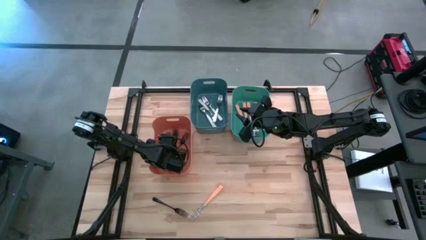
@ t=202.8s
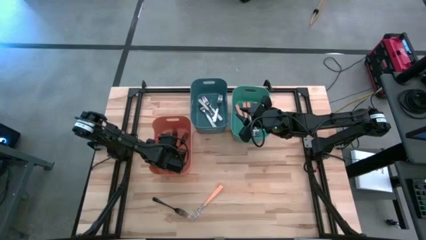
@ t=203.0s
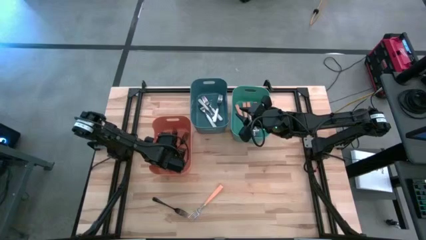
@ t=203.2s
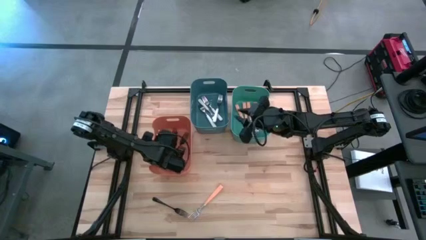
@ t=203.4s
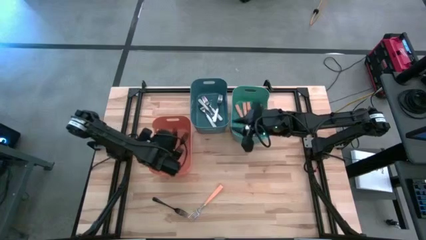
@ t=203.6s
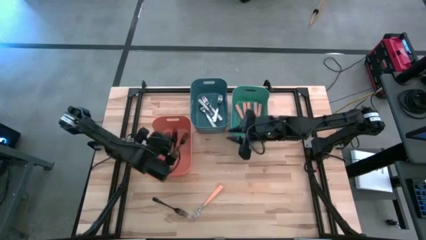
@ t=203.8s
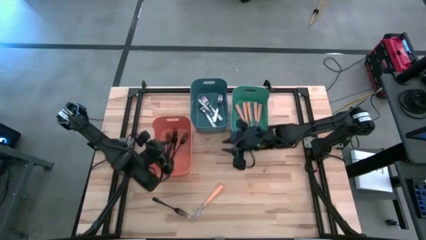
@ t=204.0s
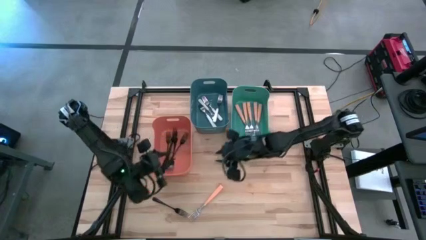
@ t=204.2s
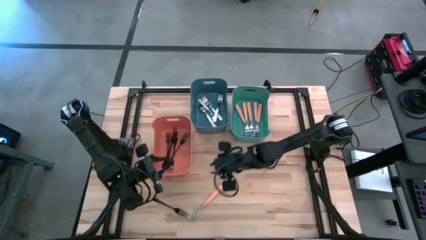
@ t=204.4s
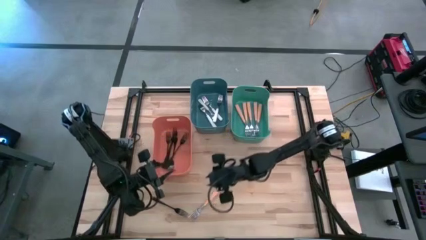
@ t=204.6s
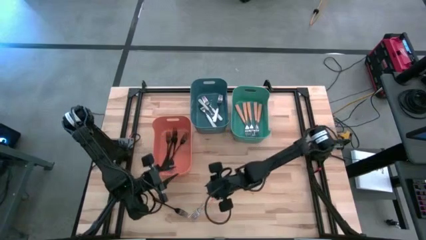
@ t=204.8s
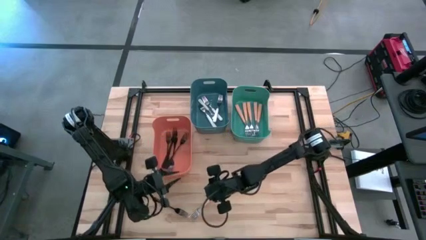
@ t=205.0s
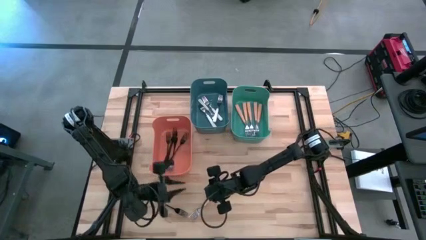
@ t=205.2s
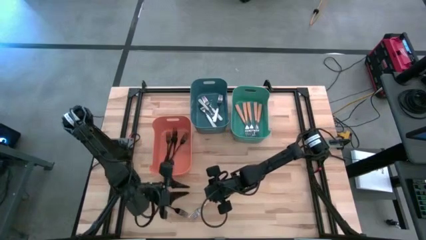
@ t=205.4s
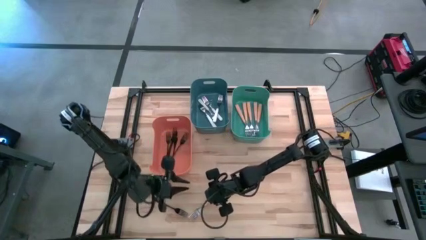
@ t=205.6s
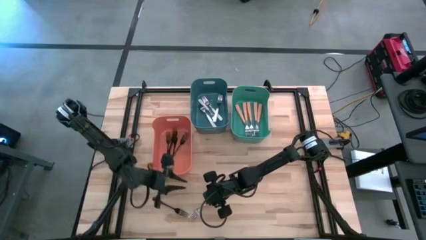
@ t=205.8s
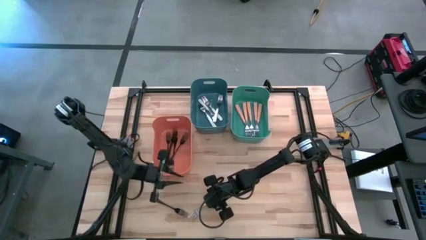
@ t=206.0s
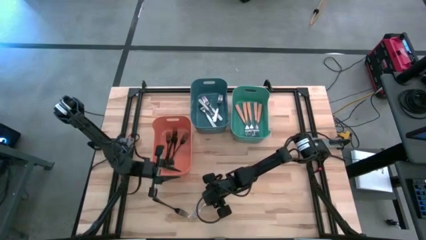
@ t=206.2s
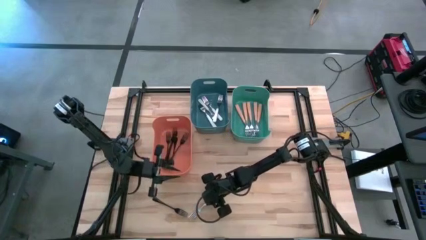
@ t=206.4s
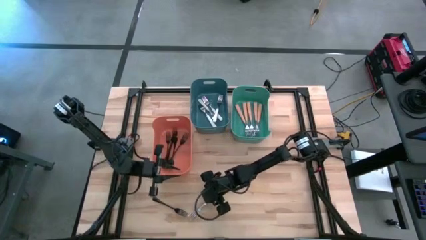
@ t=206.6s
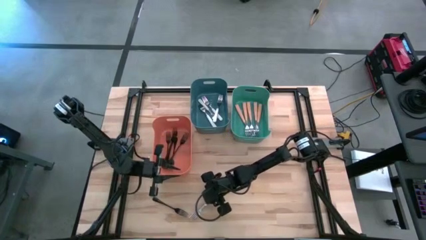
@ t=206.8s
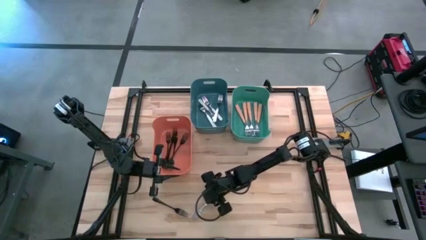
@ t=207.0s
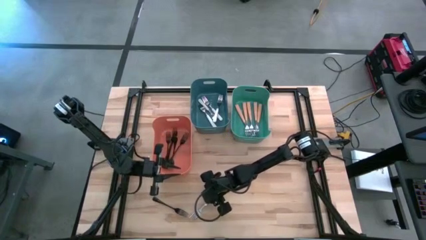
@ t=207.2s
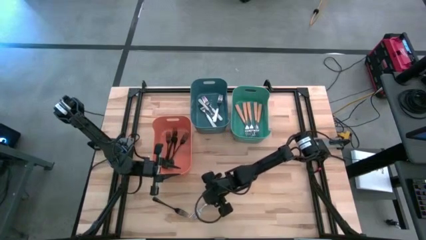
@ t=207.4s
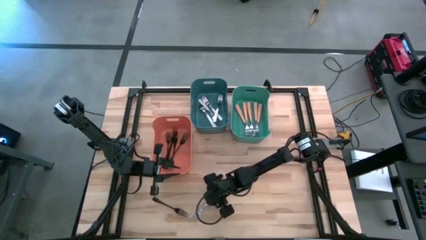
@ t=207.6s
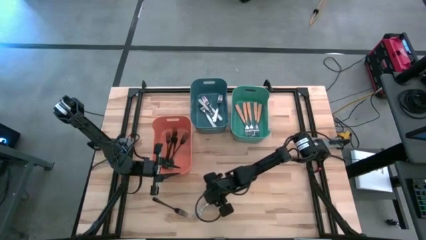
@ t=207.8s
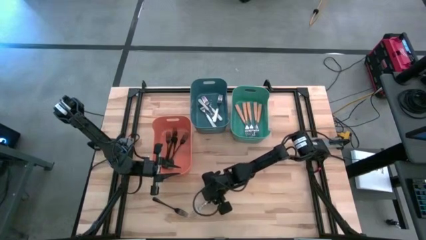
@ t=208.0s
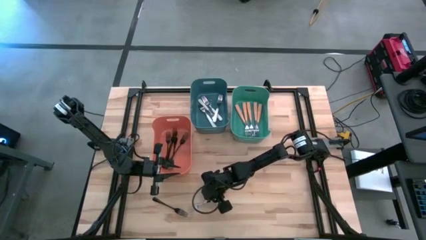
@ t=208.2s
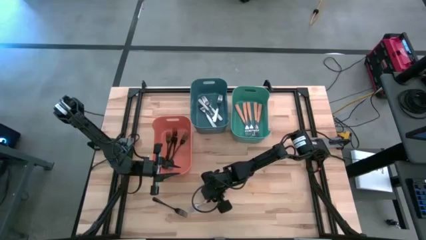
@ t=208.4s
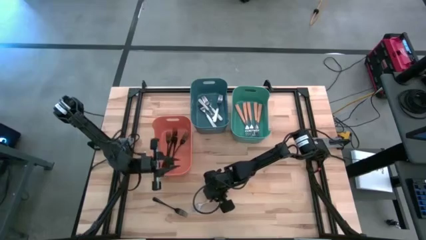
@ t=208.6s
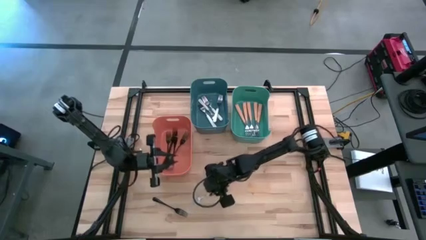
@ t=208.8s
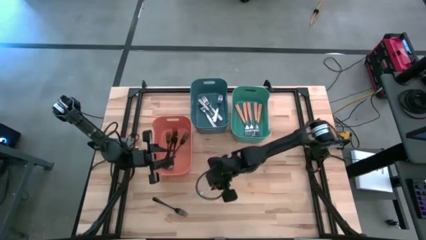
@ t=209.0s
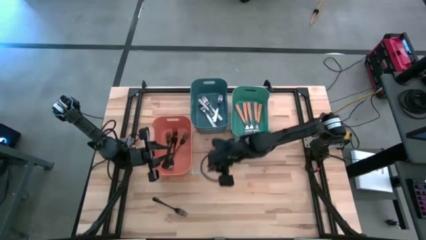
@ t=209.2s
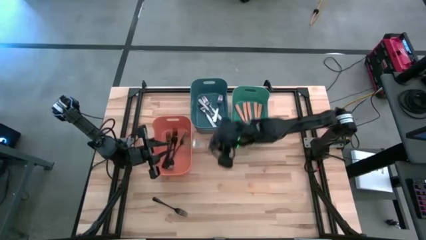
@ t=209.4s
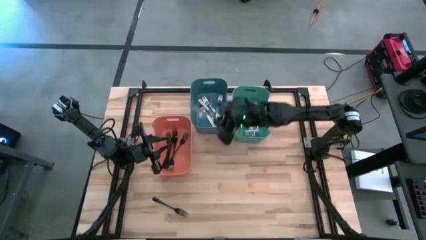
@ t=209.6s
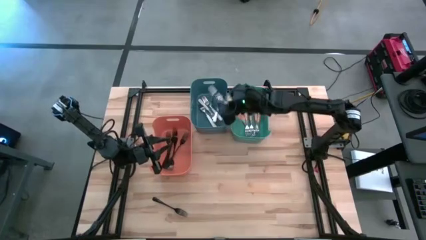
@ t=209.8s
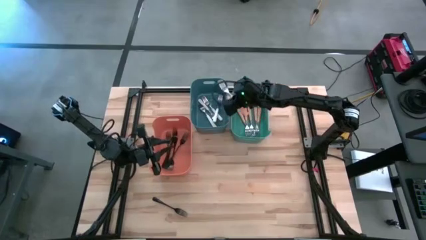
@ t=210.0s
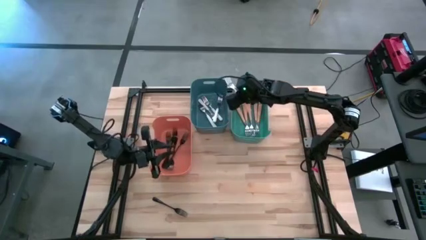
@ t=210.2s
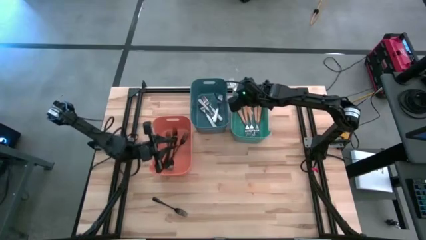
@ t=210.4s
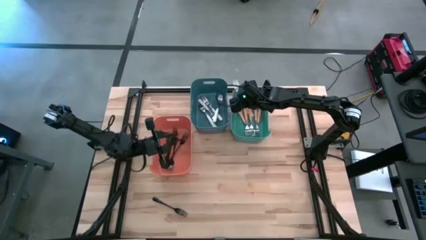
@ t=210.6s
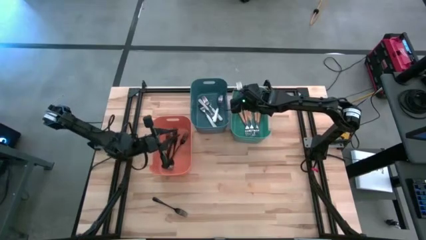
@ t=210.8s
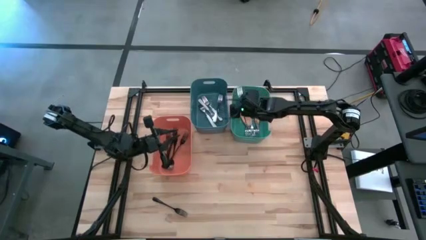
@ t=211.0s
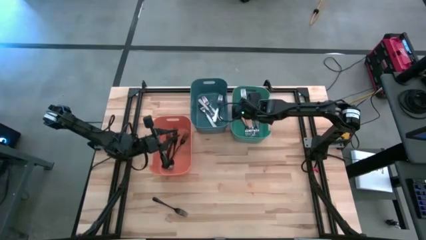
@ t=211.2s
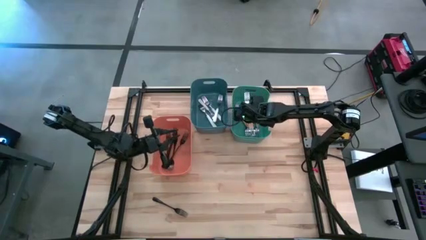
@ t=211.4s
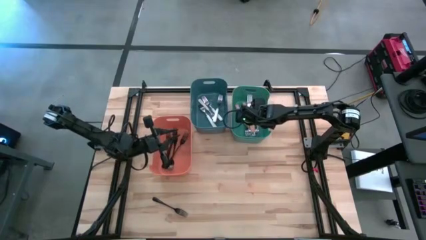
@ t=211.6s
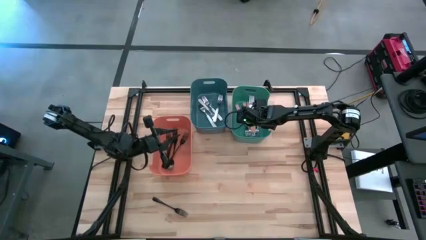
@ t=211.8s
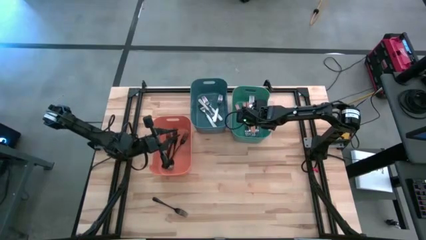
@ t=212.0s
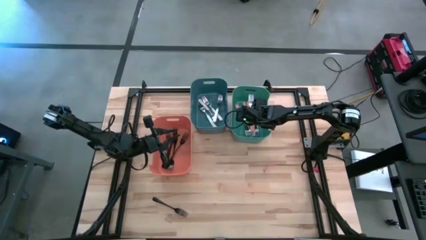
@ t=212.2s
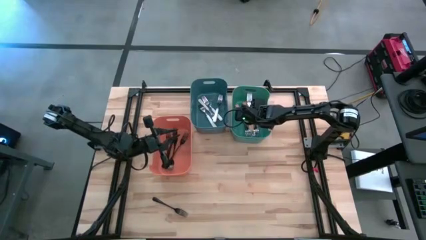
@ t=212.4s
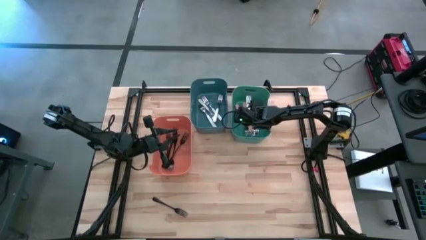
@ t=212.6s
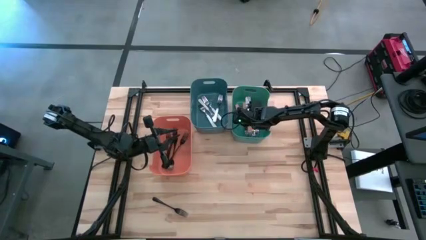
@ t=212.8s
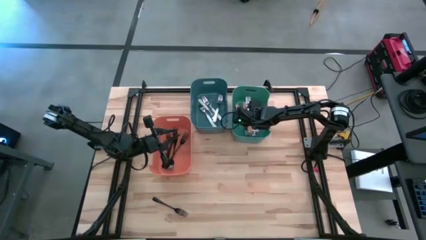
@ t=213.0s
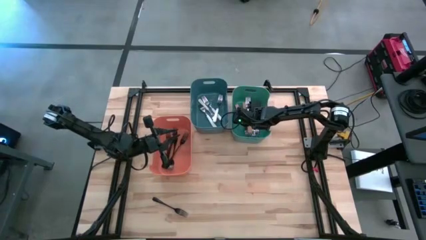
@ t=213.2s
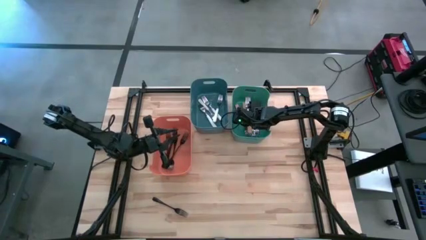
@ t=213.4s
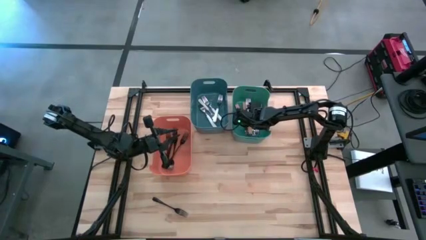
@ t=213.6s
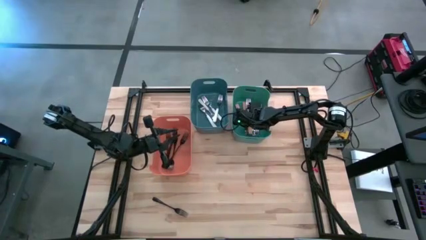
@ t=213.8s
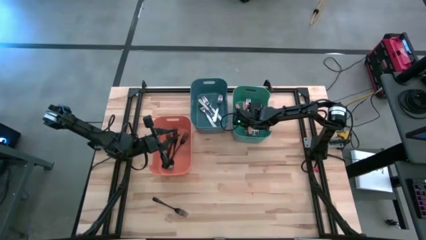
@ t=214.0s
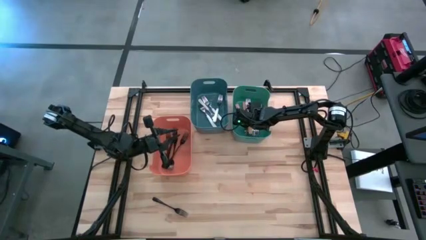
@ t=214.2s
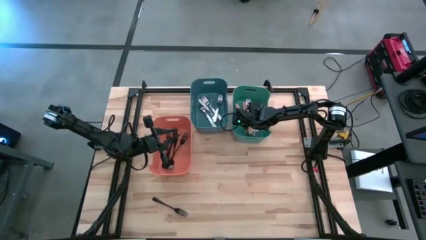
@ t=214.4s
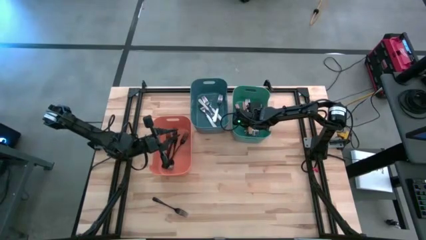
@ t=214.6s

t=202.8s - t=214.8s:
Task: Sort silverware by color (type)
Put the orange fork into the green bin
